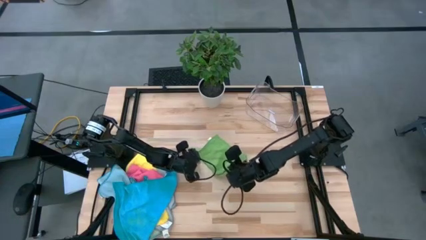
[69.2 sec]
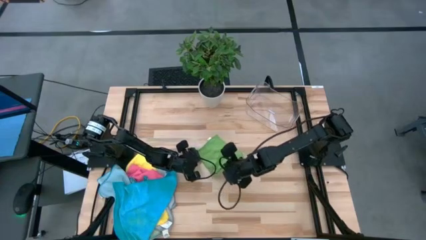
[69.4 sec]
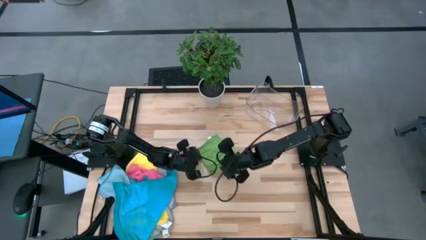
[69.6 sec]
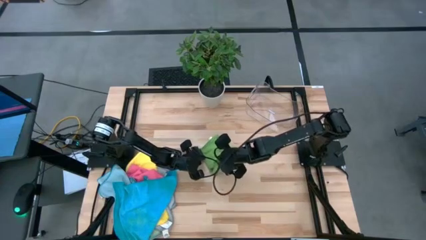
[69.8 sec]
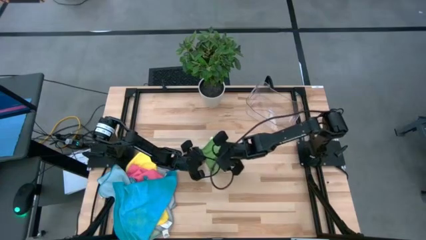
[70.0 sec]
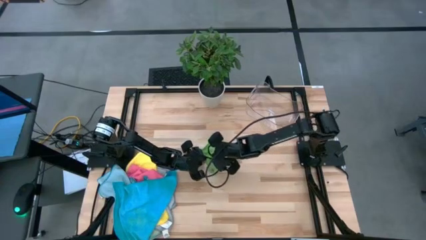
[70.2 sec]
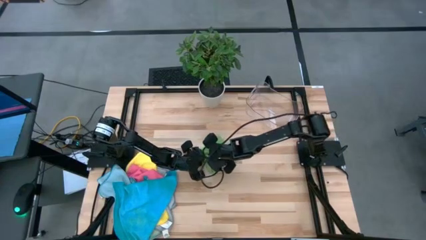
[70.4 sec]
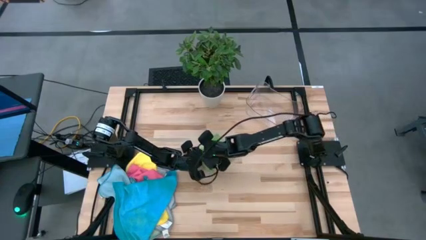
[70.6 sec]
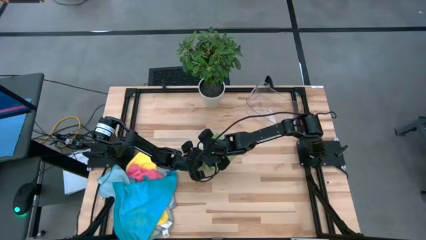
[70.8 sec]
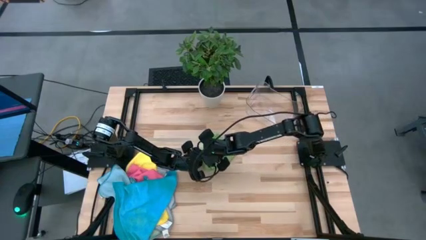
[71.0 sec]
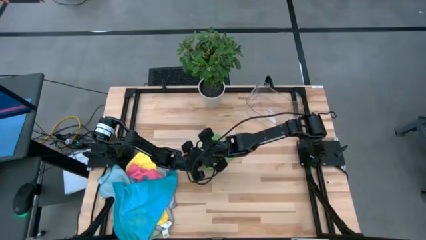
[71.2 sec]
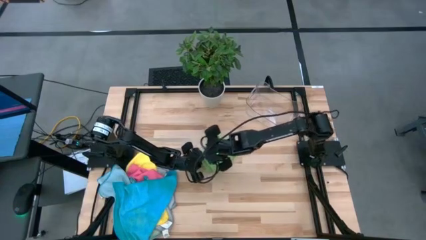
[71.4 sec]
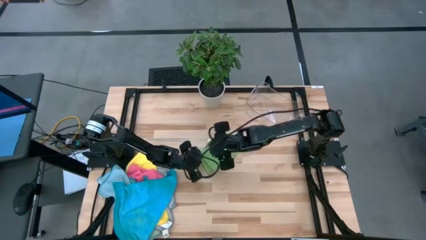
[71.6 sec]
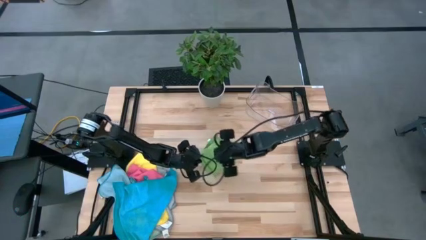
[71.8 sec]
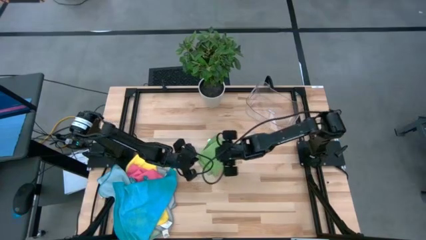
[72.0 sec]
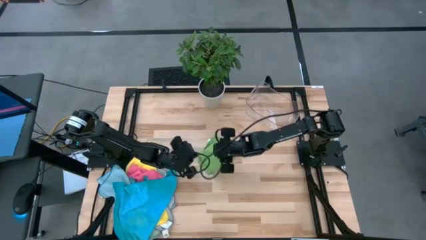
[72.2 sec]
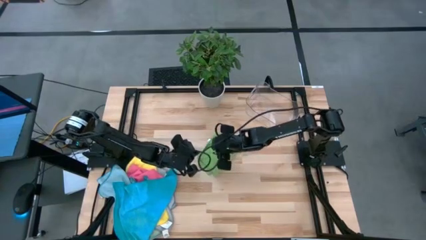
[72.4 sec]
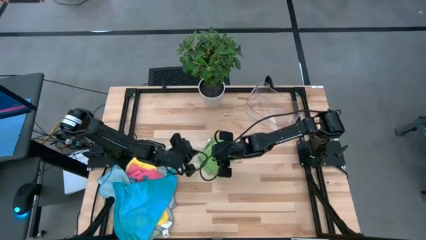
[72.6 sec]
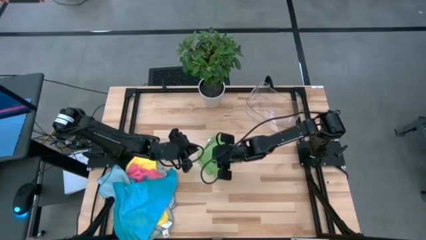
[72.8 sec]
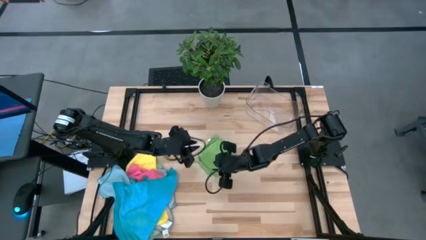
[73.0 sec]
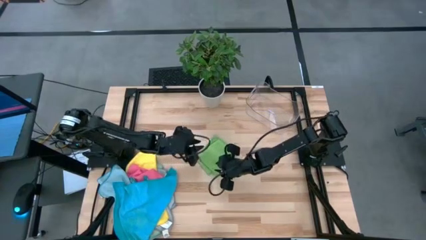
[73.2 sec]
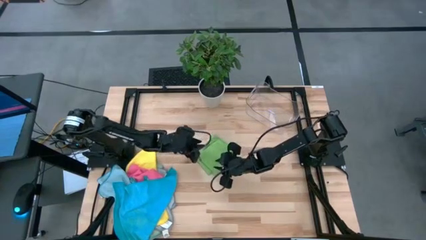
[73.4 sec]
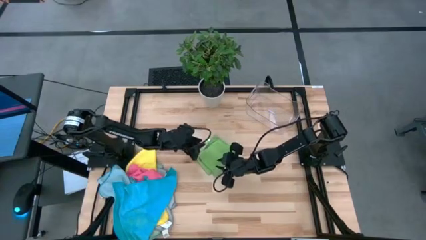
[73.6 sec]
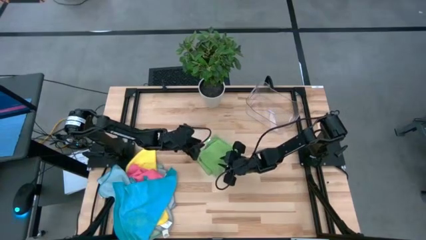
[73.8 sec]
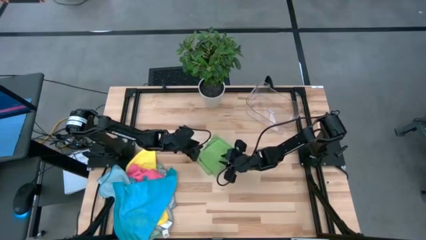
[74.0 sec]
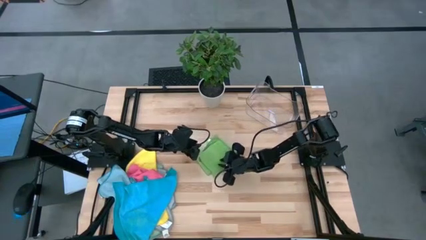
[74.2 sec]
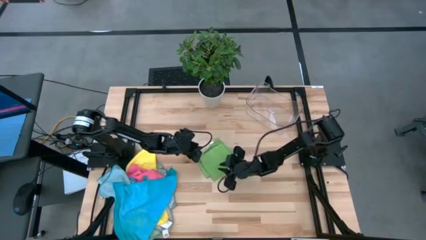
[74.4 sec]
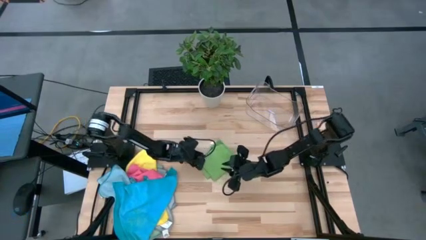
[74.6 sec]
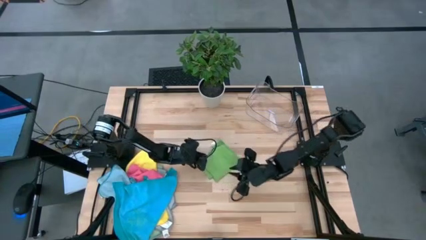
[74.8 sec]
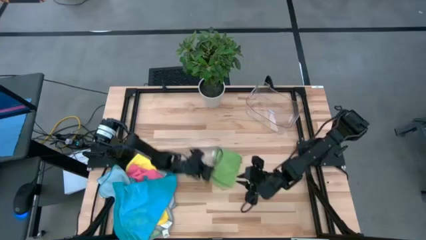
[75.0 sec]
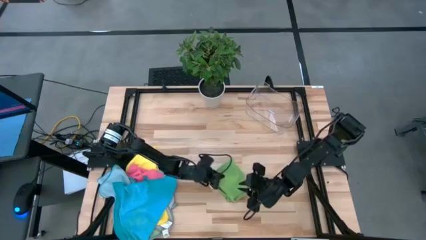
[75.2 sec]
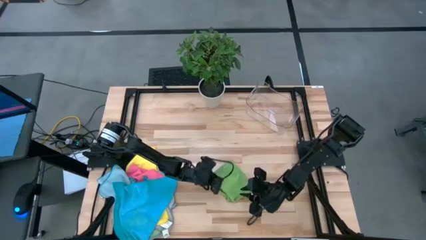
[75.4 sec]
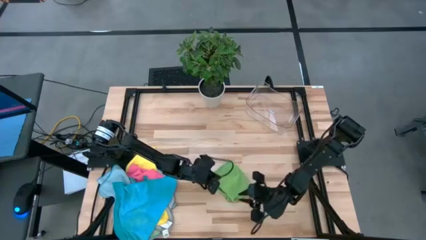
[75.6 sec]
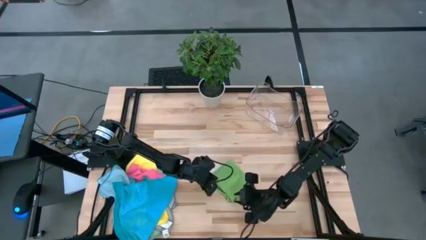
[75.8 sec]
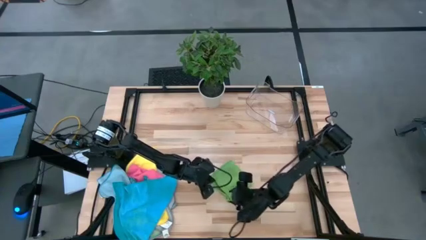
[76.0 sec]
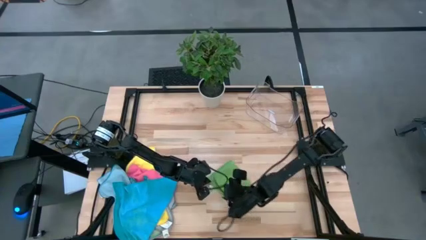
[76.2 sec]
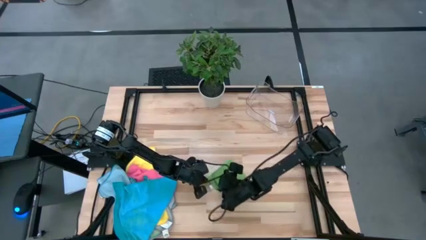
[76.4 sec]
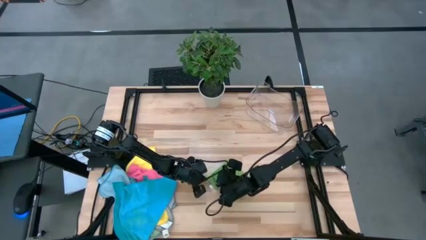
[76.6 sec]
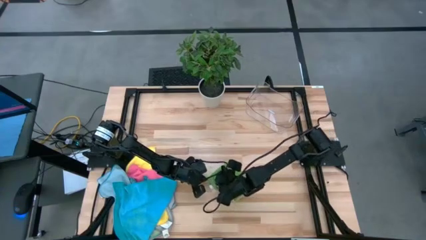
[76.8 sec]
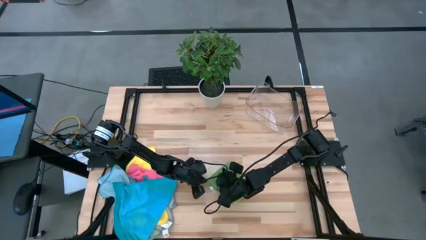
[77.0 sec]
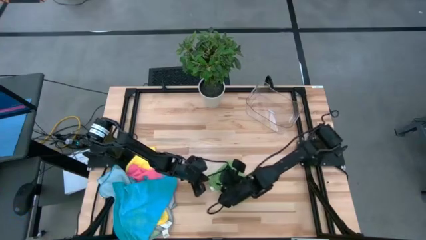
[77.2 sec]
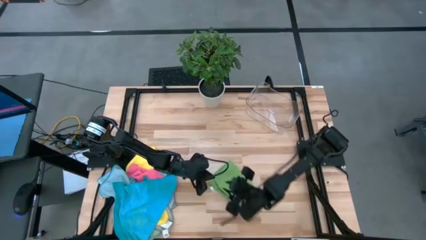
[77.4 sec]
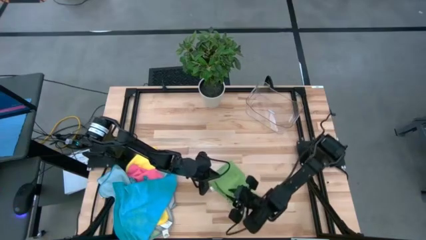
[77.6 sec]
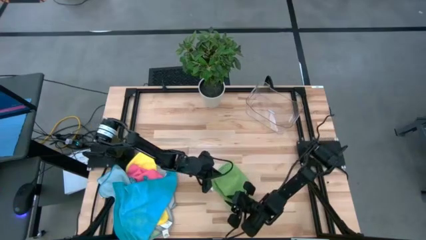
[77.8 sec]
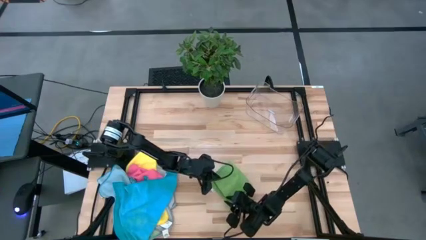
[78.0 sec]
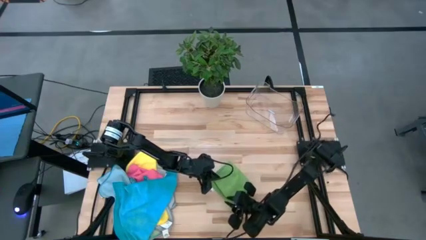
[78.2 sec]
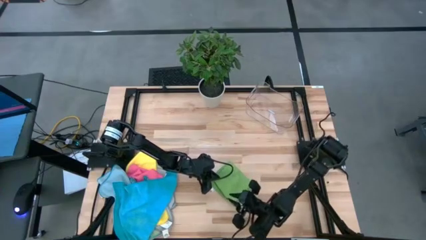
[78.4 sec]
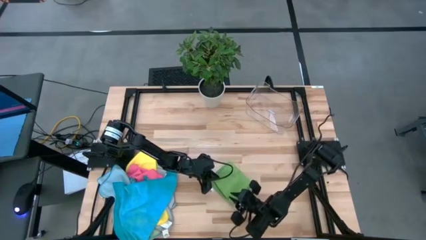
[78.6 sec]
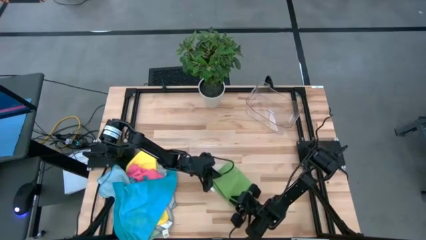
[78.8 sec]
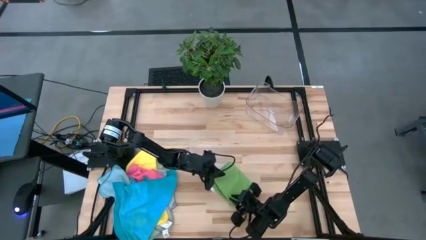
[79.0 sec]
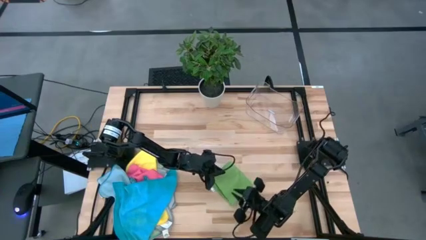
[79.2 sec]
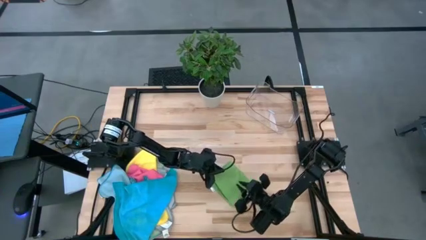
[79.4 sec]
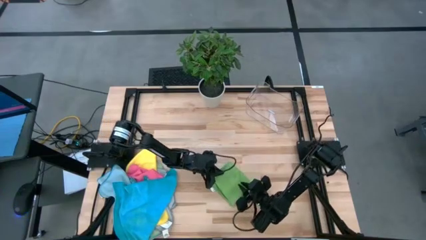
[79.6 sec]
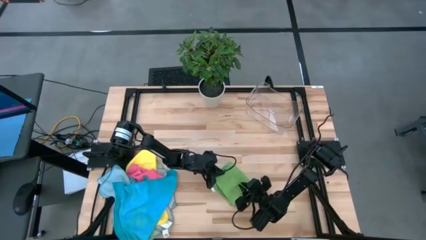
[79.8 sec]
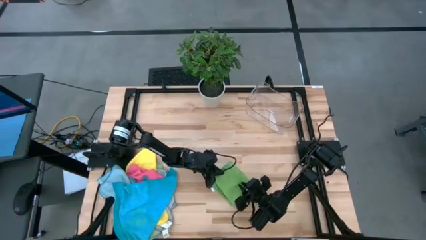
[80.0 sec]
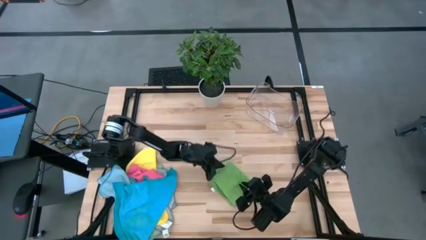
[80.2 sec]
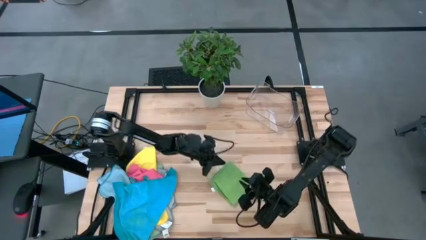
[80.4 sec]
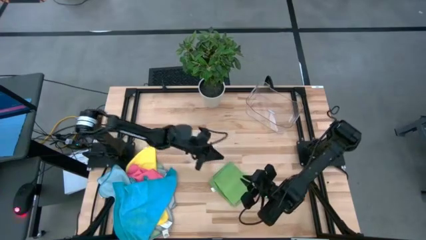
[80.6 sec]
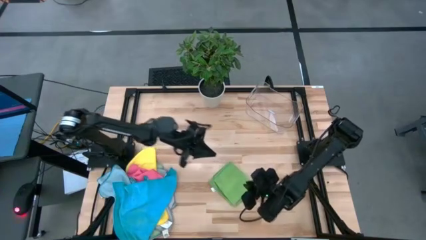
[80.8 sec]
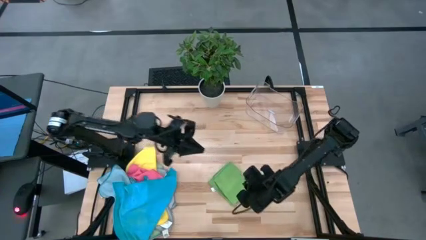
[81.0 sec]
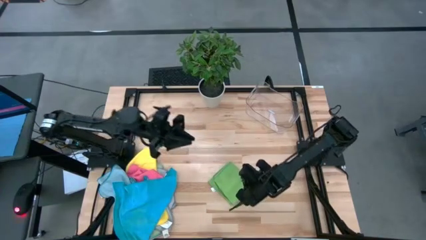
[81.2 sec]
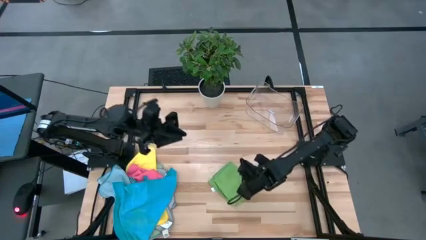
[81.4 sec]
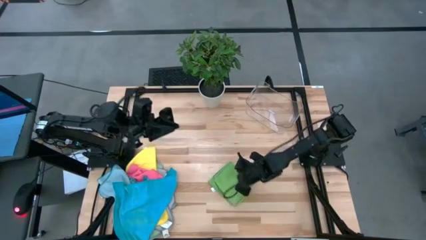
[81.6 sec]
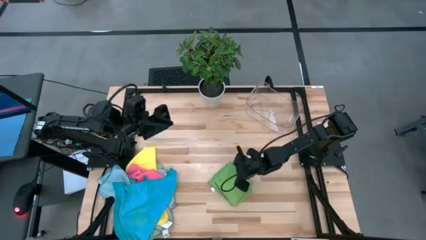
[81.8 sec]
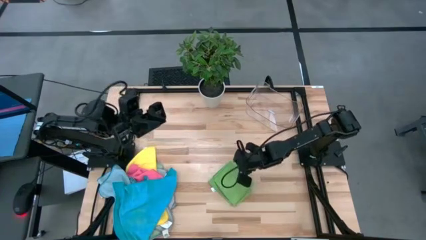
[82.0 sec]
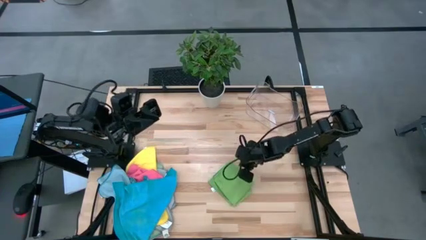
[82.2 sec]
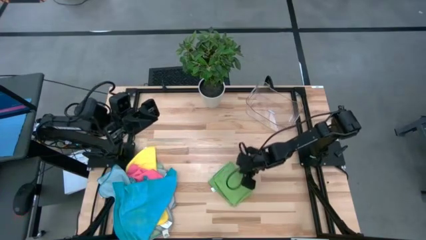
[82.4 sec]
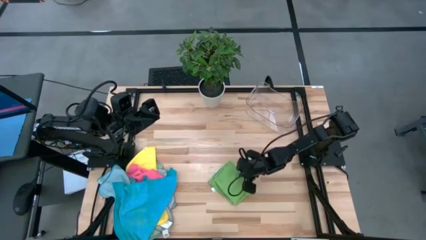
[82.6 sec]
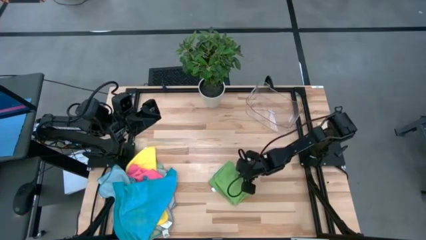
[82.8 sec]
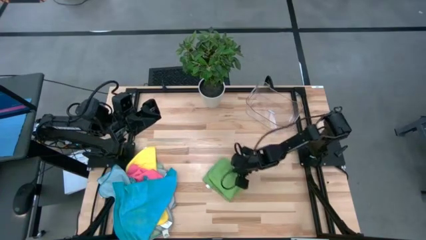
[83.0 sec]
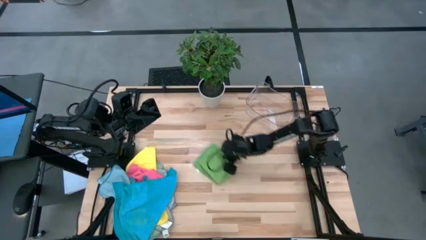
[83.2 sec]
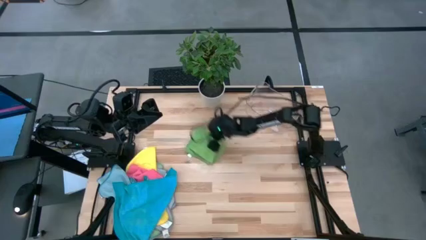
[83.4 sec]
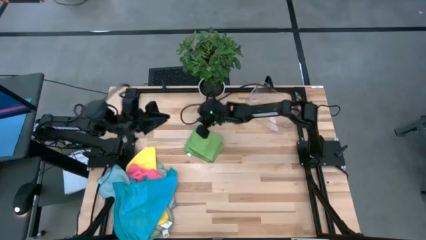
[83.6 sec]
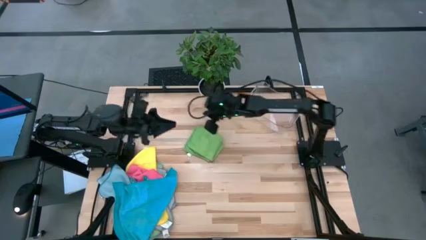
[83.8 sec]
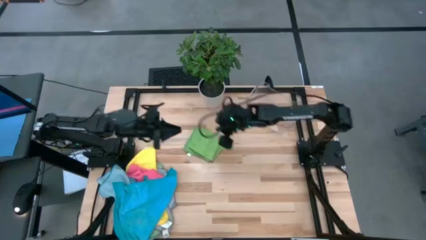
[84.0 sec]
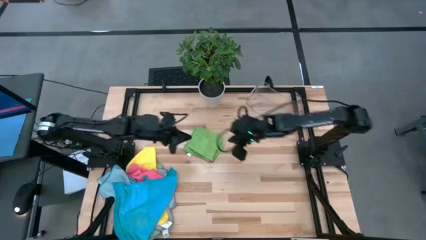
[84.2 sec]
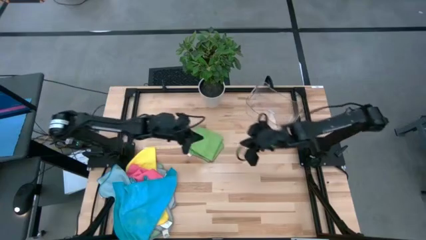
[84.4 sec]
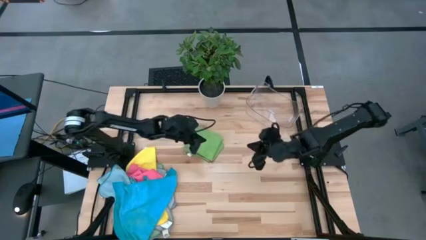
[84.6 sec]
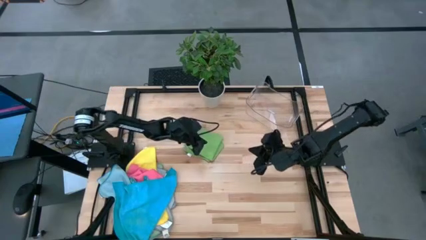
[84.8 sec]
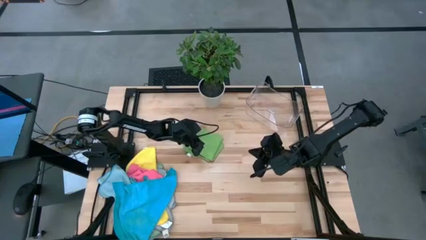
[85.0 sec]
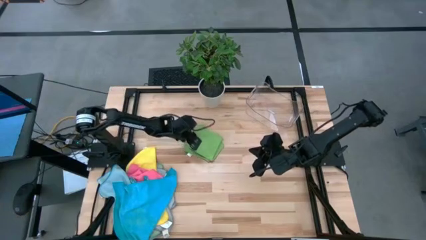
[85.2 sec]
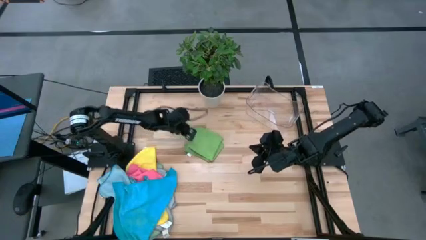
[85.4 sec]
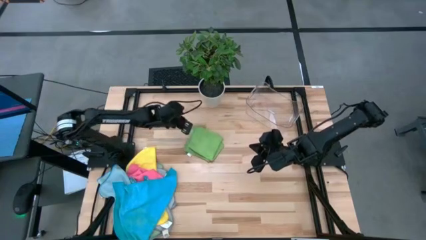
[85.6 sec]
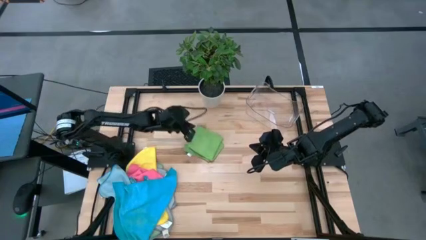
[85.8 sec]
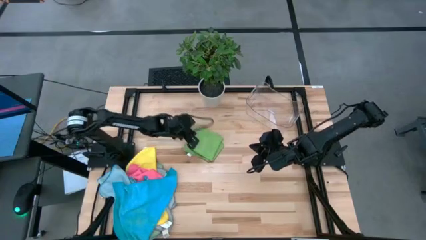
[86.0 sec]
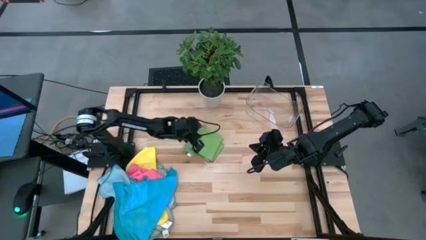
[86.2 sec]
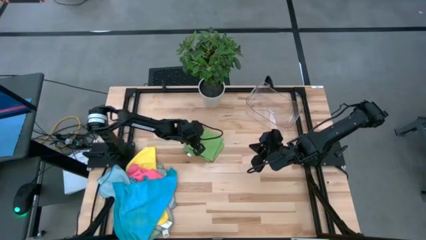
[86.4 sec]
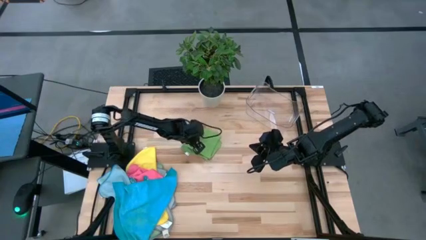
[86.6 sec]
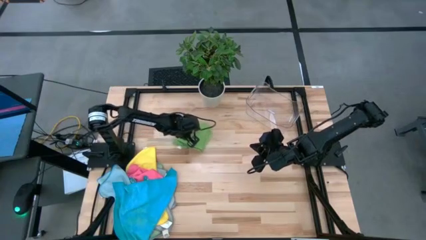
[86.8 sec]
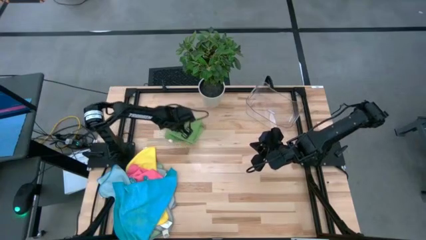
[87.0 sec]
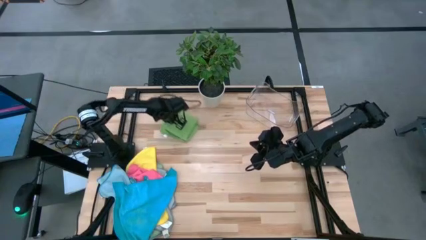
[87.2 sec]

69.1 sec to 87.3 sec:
Task: Fold microfiber towels
Fold the green microfiber towel
